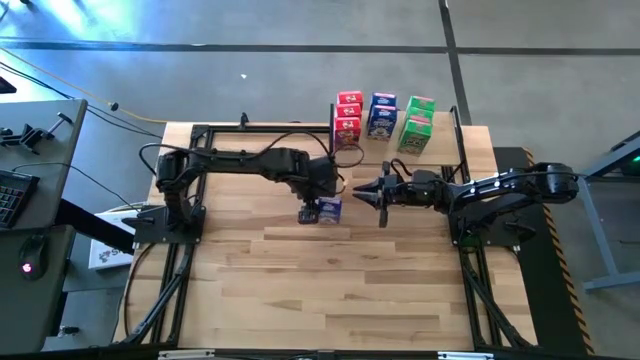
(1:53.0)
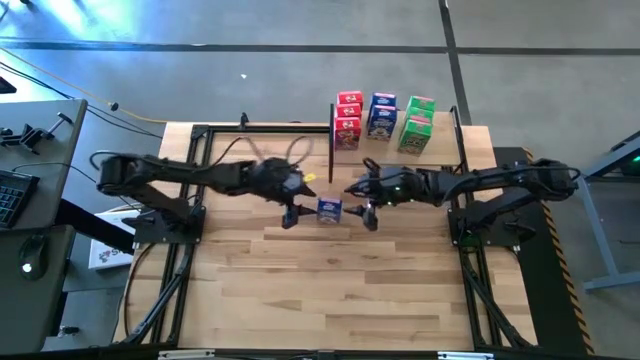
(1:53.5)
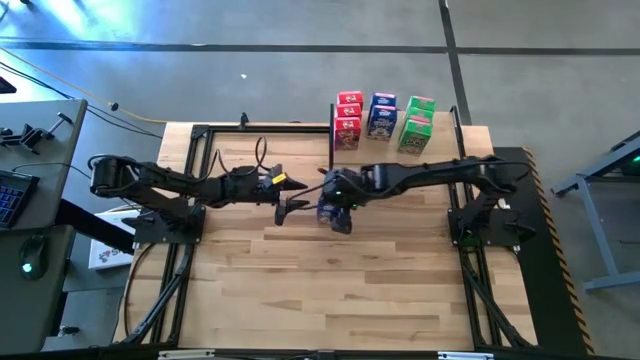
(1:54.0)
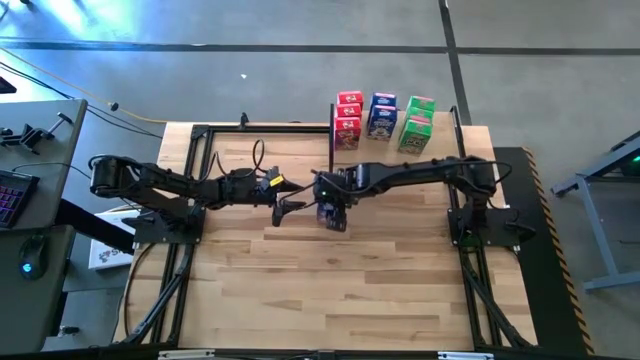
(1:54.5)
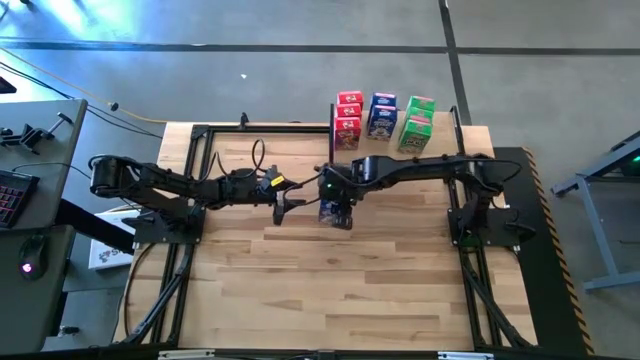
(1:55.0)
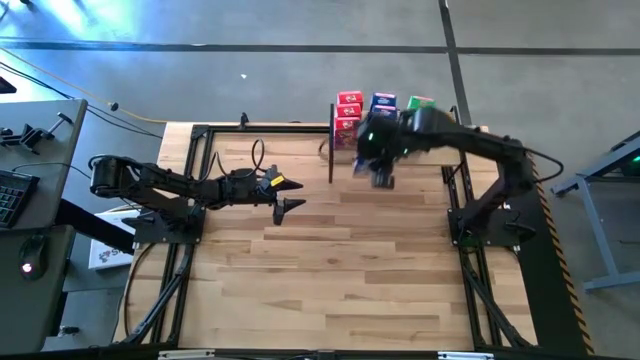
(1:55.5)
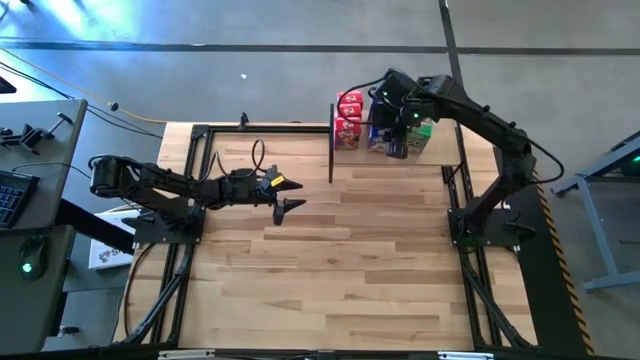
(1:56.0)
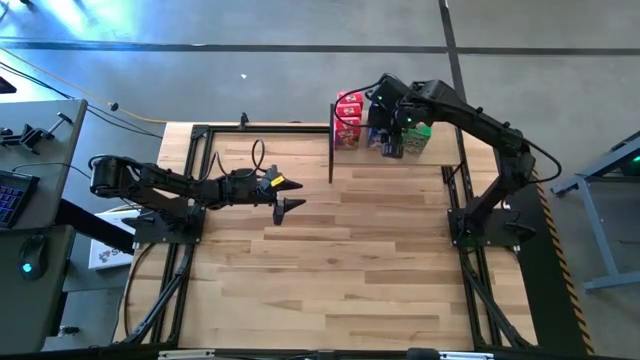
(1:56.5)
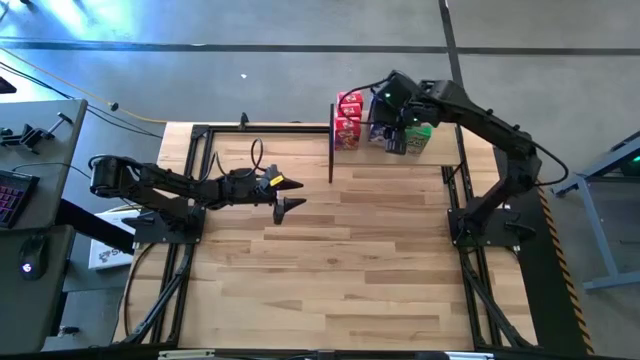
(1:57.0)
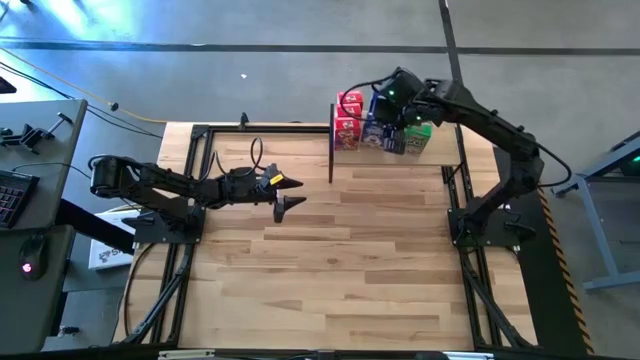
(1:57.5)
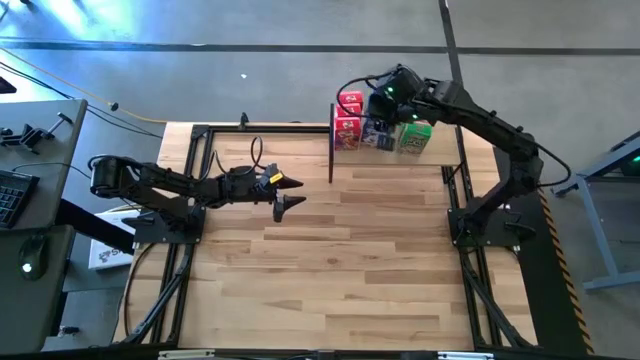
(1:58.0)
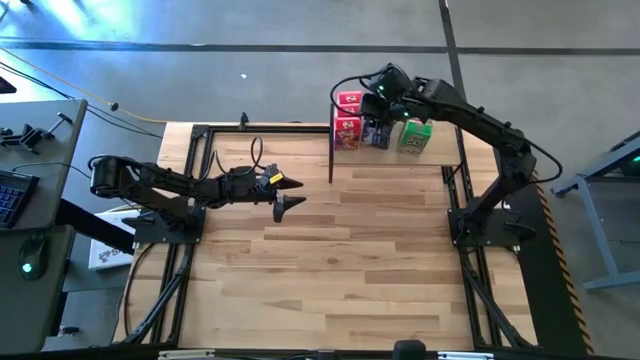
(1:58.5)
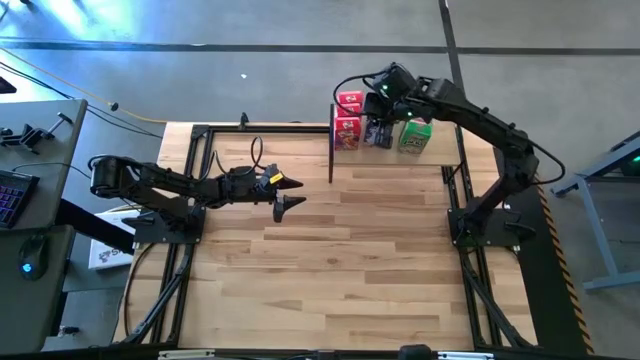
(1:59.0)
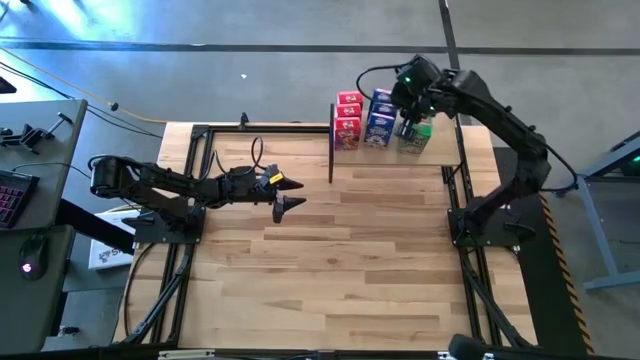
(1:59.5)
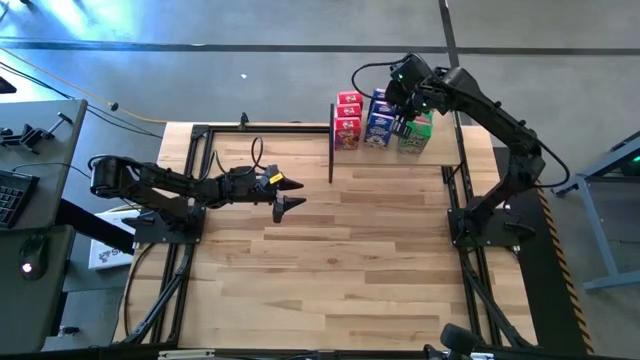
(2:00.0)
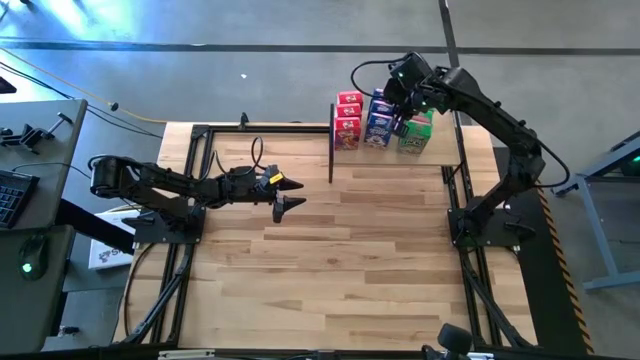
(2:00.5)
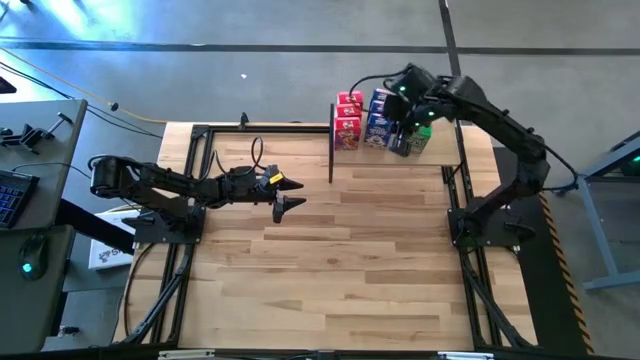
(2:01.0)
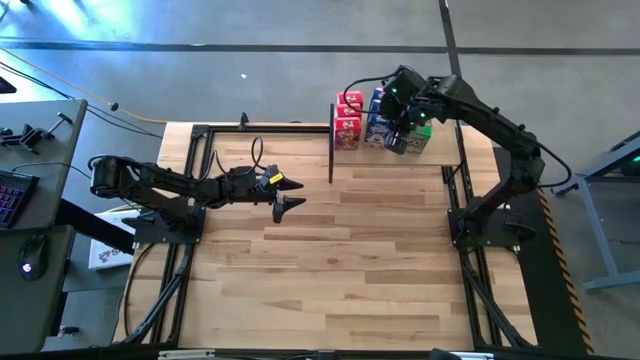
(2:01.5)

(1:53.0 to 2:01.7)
Task: Stack cereal on shelf
Put the blue cereal box on the shelf and aligned with the other blue cereal box

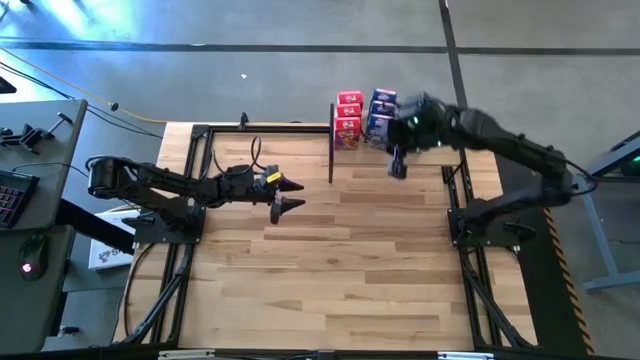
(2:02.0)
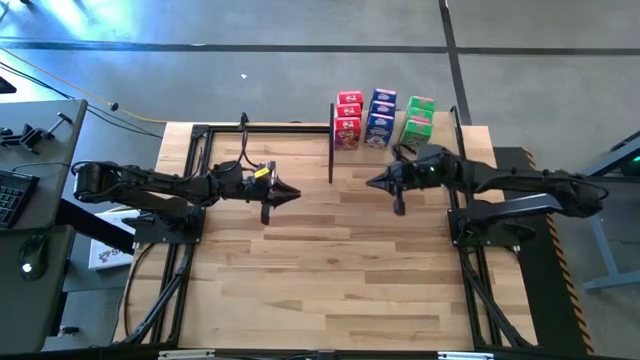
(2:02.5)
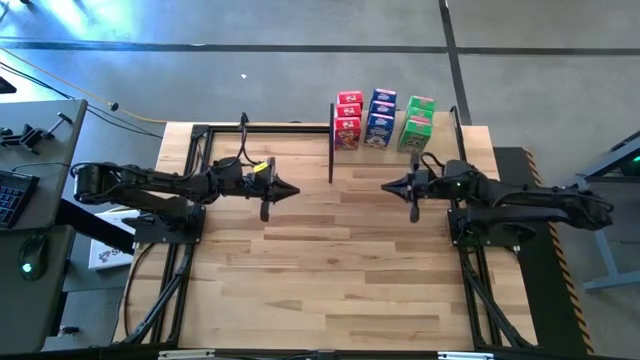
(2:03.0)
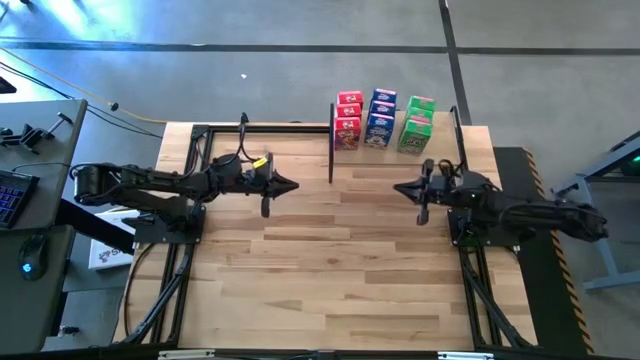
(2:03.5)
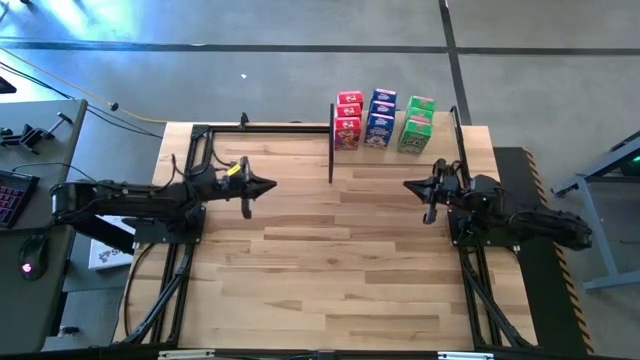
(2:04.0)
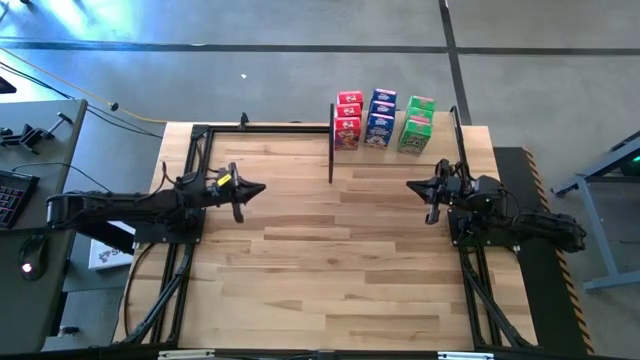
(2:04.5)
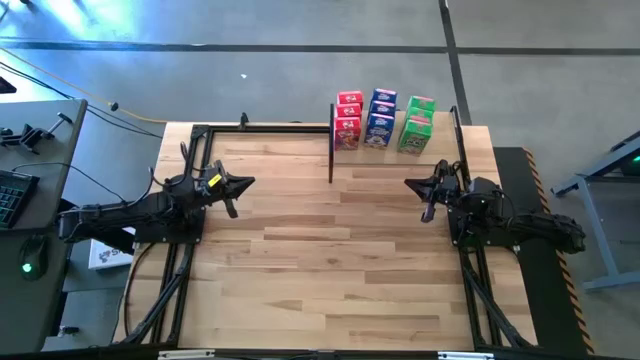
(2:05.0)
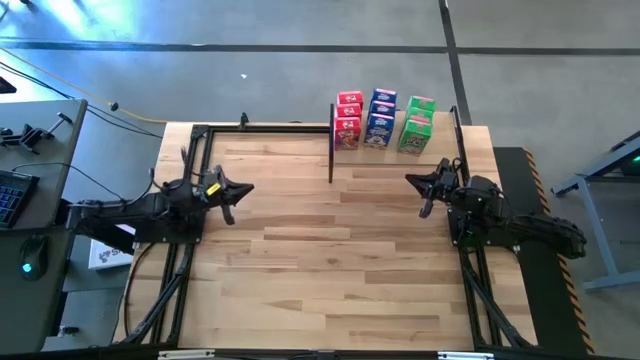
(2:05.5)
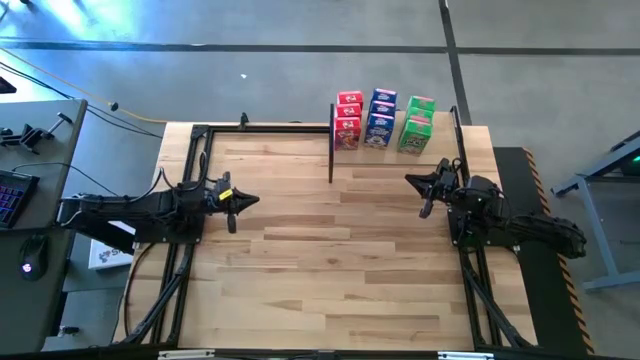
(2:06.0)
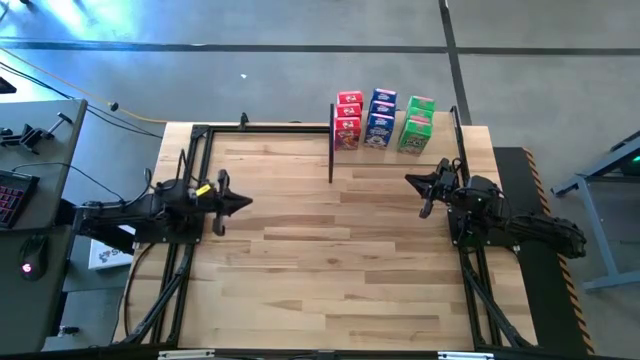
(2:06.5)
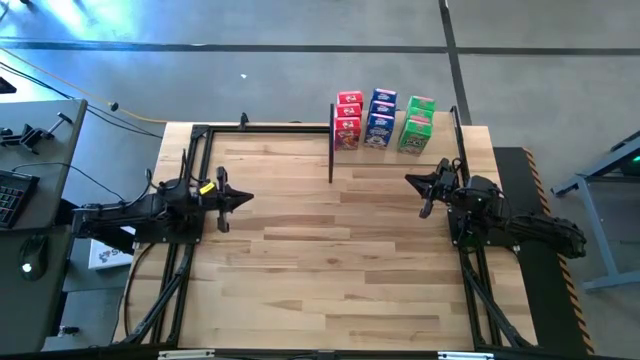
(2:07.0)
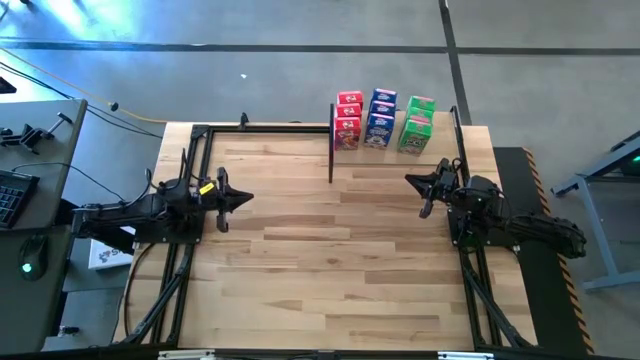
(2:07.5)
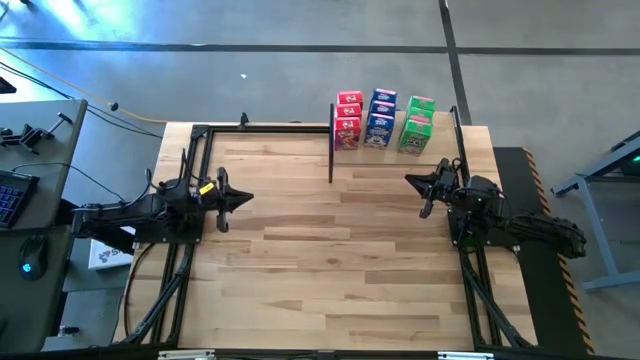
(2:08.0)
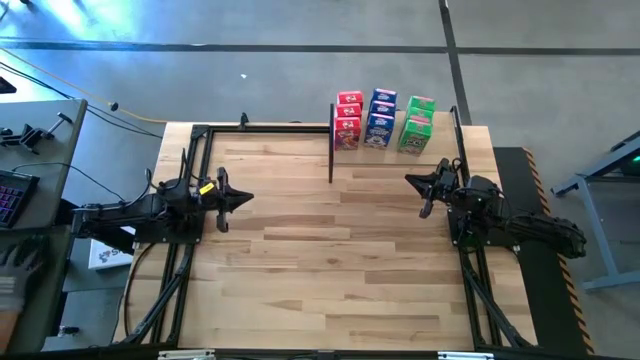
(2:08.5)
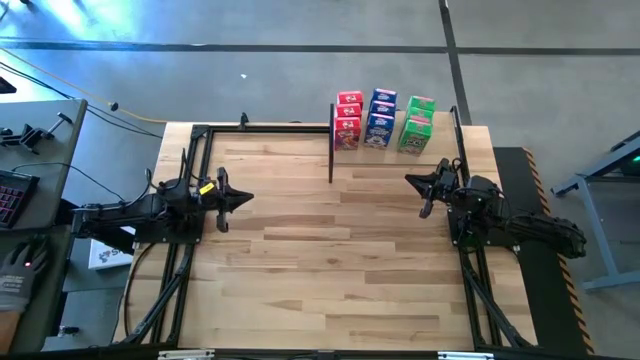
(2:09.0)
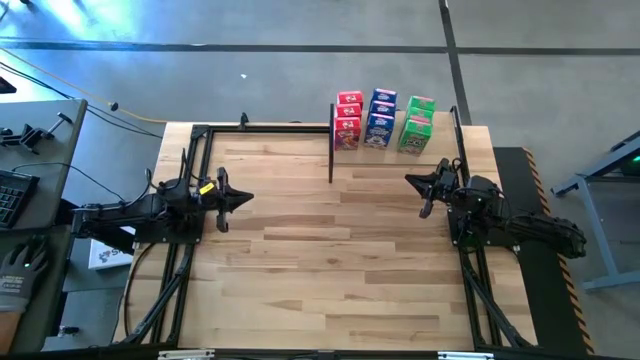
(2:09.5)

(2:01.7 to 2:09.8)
Return to Home Position

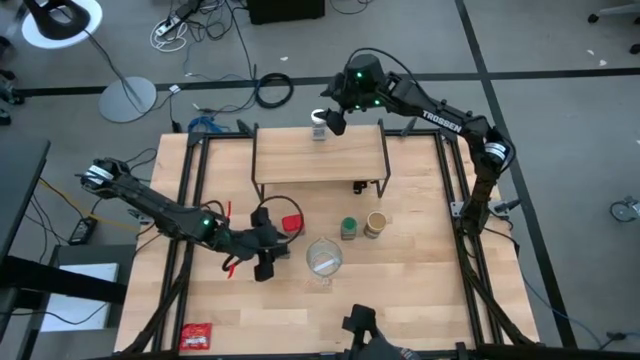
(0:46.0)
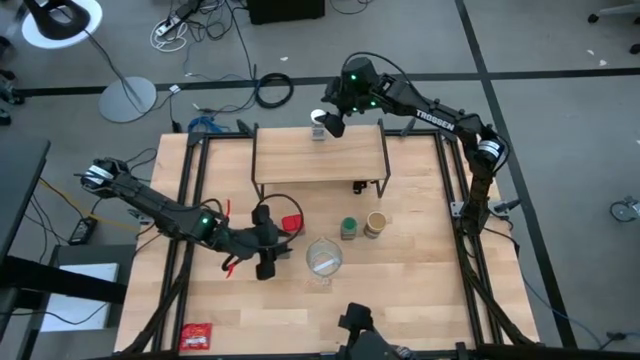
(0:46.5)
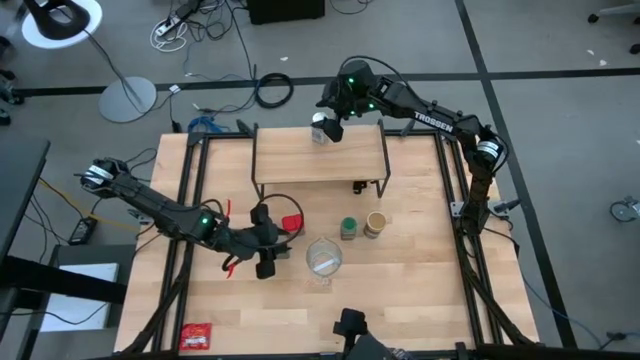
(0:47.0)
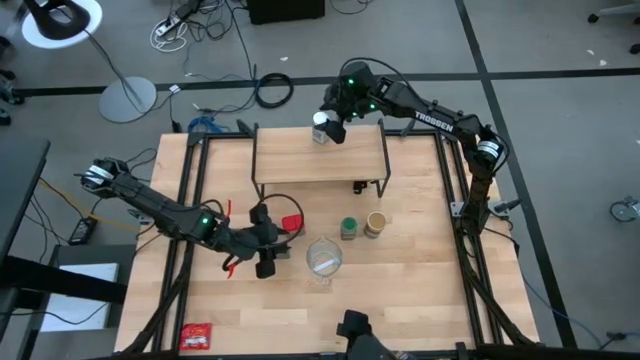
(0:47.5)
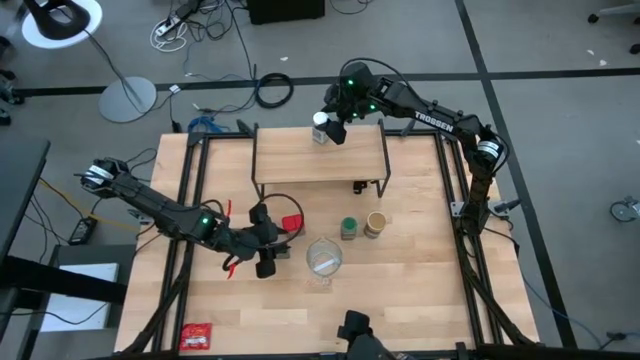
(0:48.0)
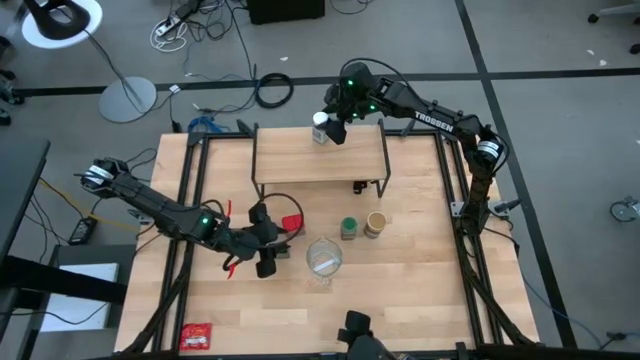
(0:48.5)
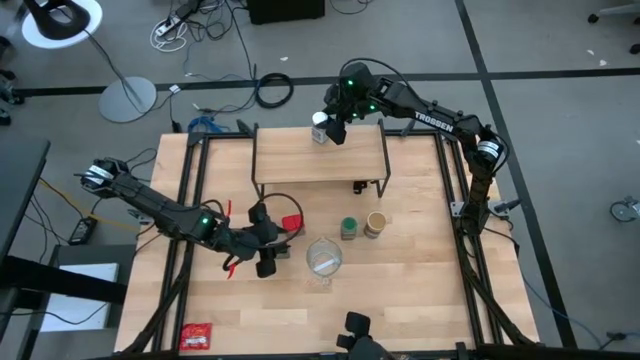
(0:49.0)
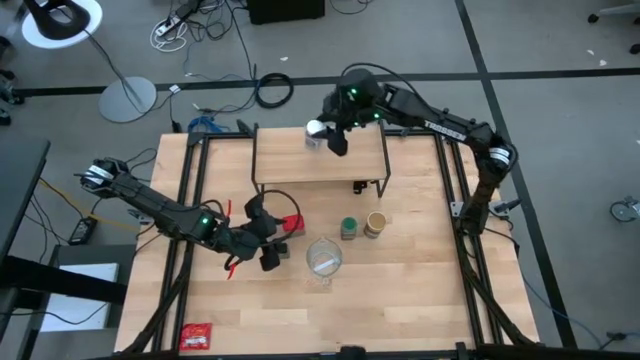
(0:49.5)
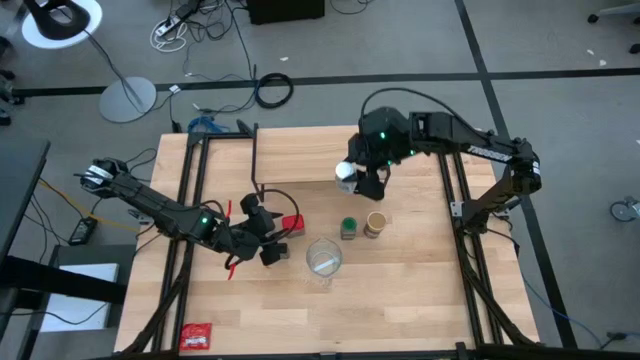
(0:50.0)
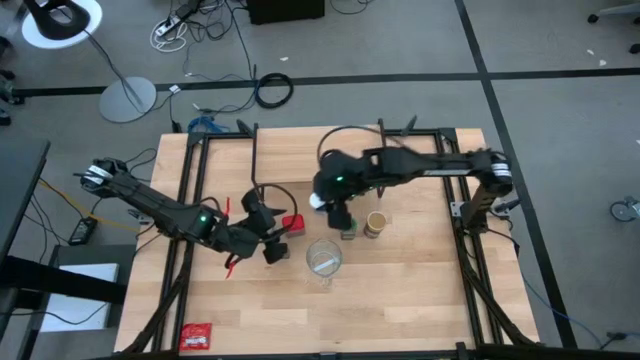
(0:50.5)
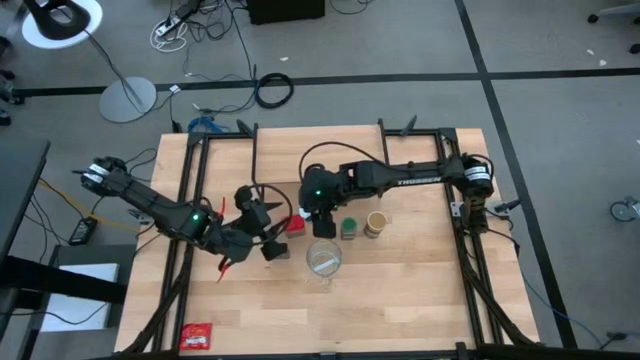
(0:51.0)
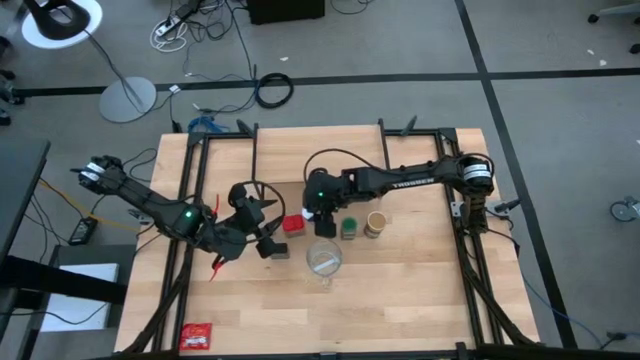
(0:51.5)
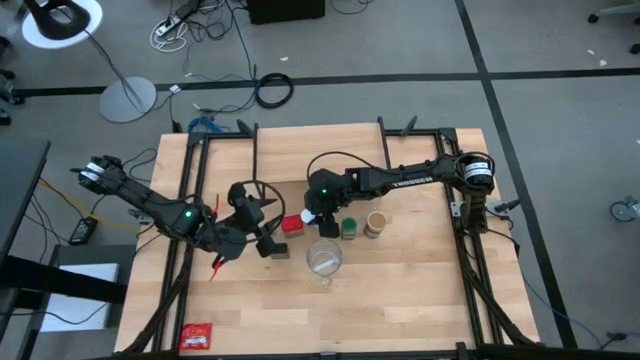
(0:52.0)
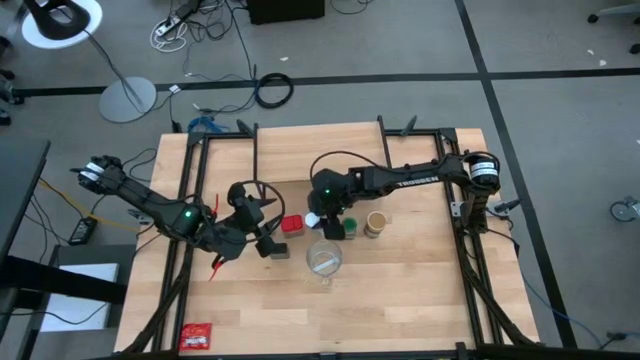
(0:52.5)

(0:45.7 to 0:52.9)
Task: Shelf spices
Remove the white seasoning bottle from the shelf
